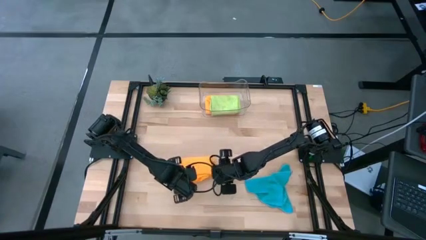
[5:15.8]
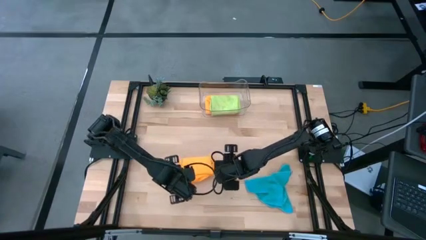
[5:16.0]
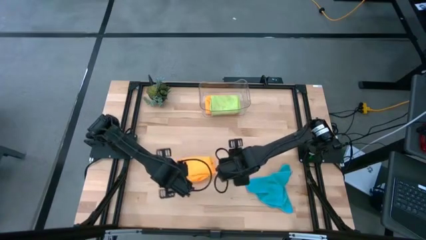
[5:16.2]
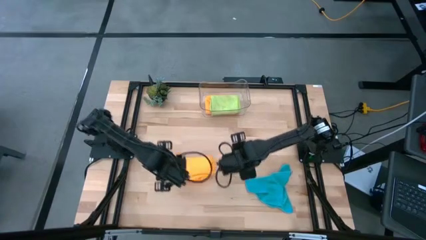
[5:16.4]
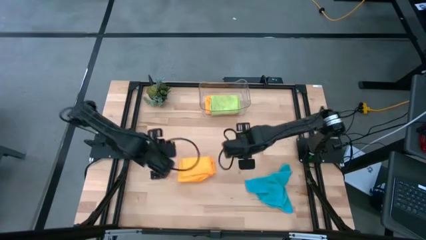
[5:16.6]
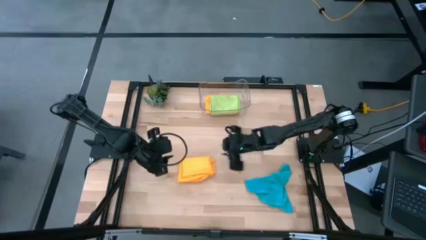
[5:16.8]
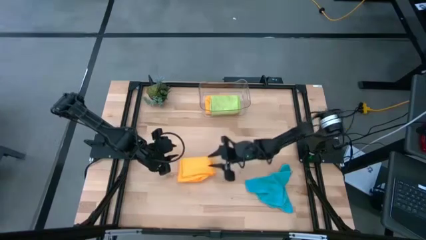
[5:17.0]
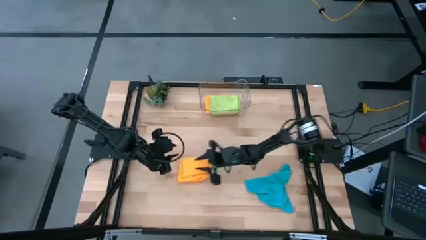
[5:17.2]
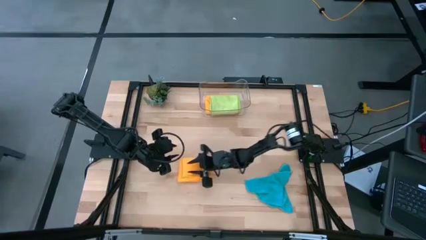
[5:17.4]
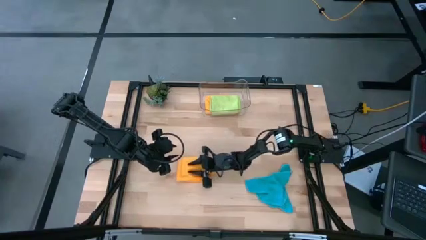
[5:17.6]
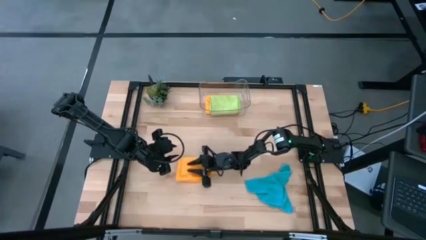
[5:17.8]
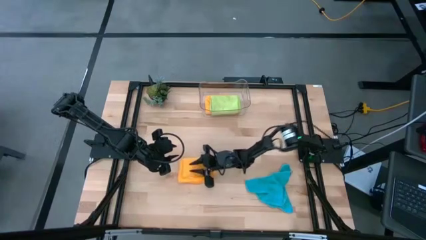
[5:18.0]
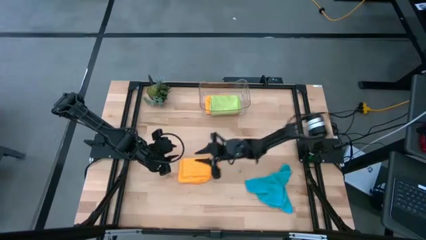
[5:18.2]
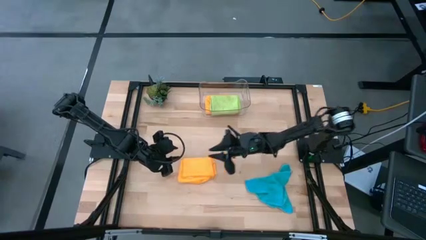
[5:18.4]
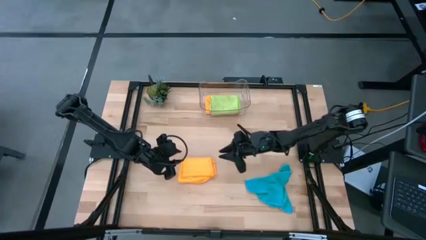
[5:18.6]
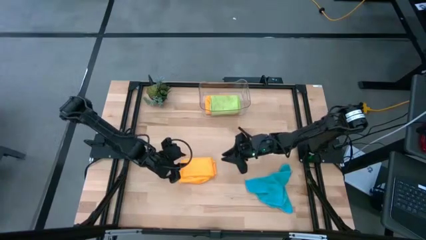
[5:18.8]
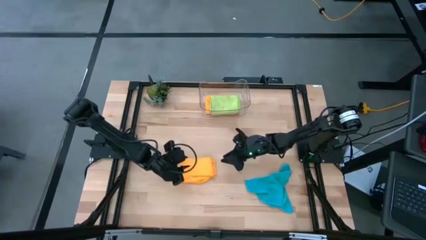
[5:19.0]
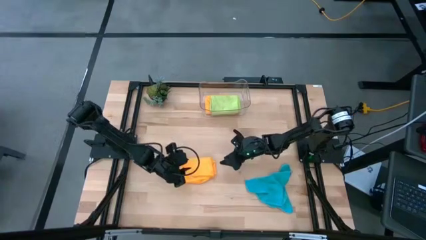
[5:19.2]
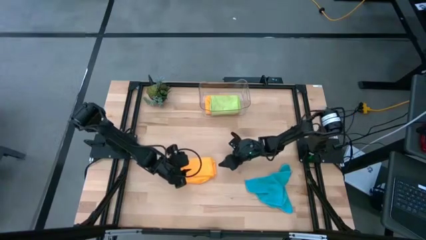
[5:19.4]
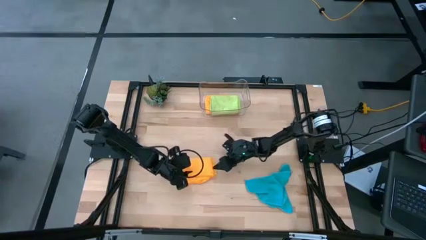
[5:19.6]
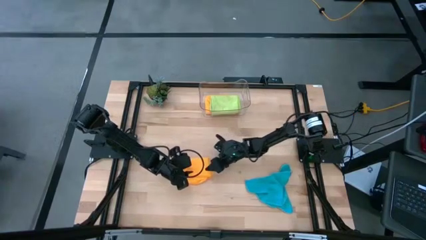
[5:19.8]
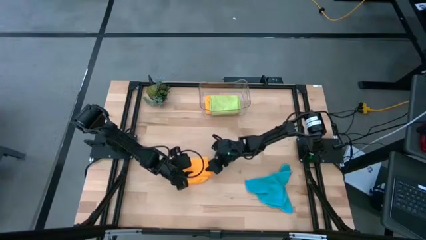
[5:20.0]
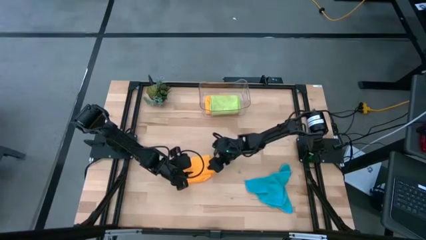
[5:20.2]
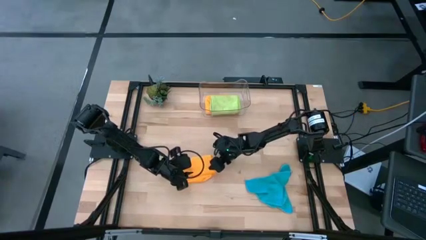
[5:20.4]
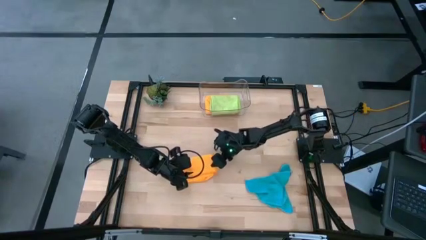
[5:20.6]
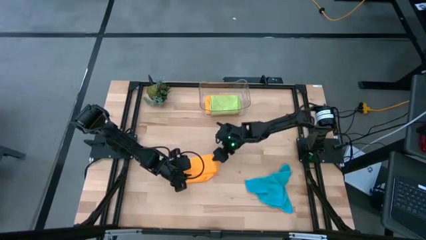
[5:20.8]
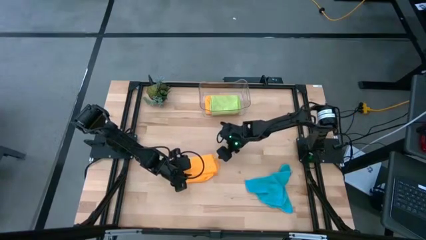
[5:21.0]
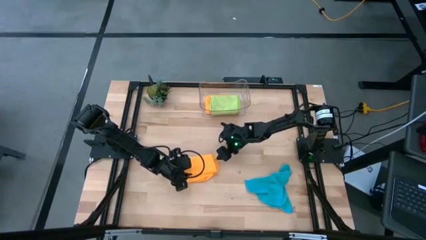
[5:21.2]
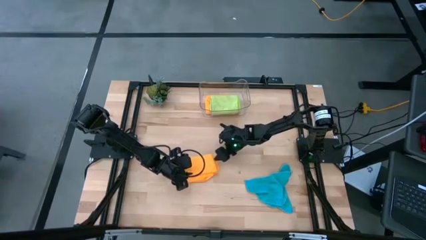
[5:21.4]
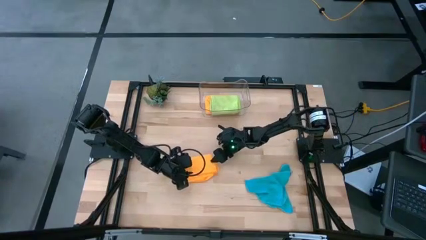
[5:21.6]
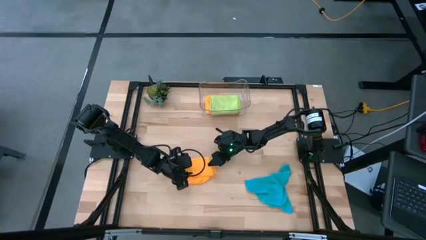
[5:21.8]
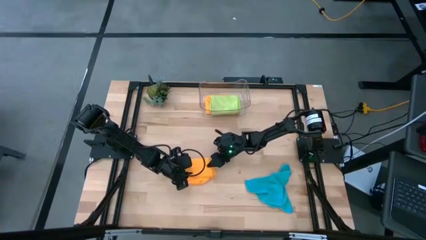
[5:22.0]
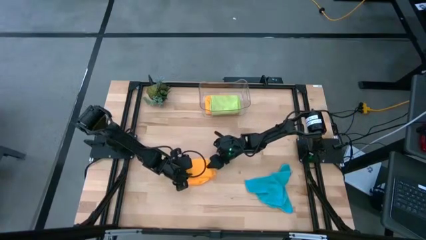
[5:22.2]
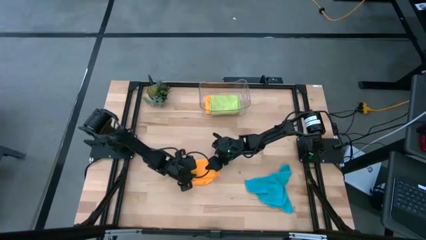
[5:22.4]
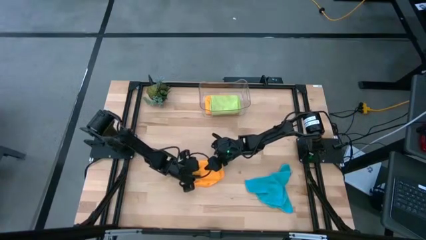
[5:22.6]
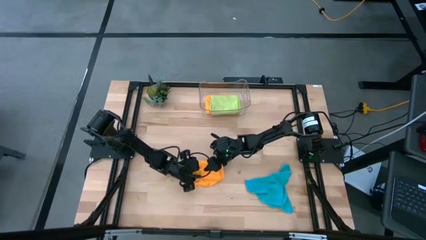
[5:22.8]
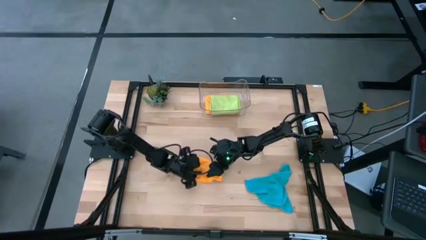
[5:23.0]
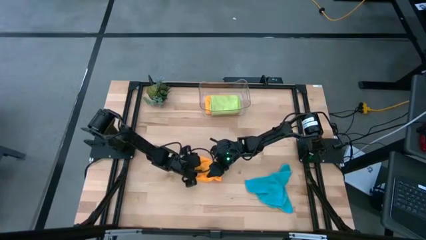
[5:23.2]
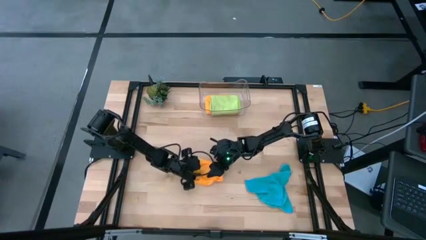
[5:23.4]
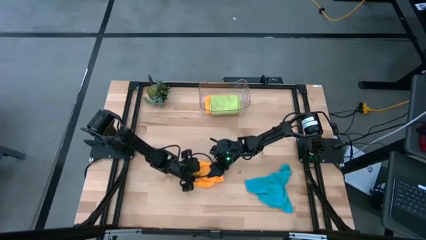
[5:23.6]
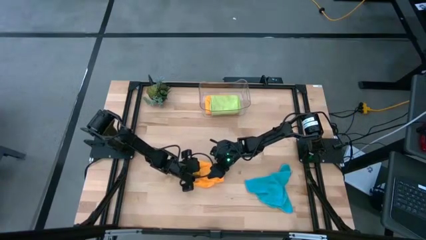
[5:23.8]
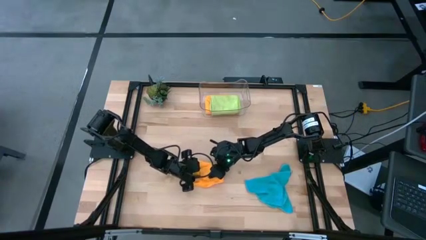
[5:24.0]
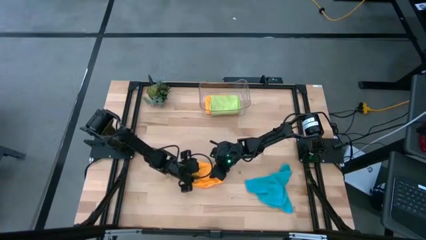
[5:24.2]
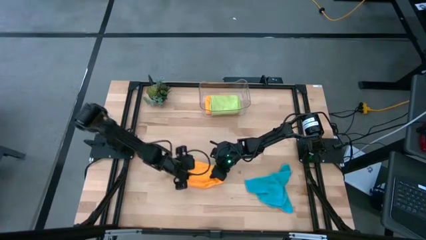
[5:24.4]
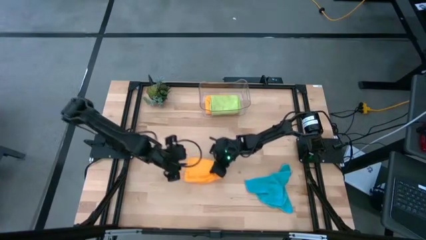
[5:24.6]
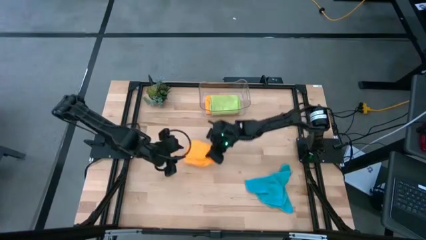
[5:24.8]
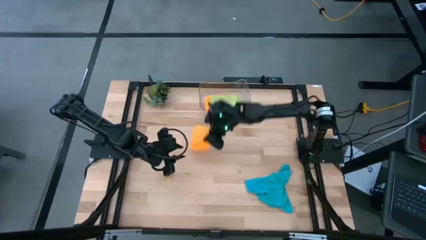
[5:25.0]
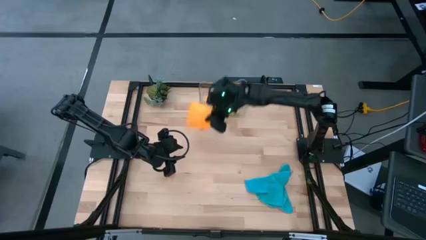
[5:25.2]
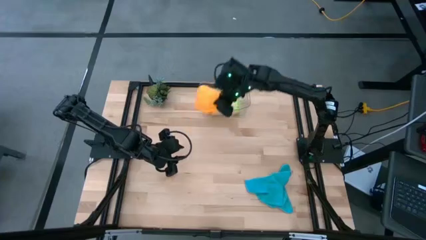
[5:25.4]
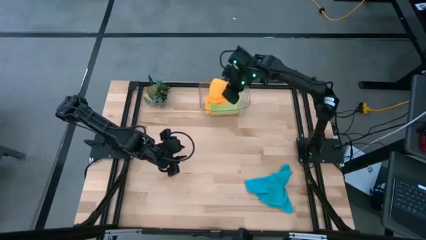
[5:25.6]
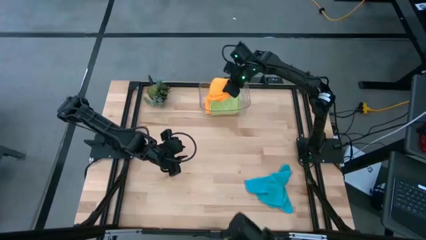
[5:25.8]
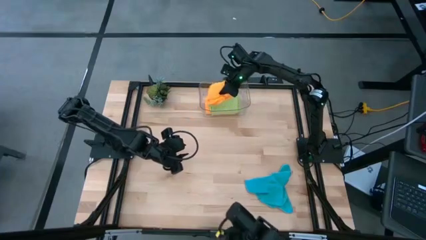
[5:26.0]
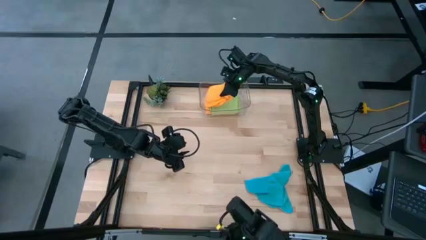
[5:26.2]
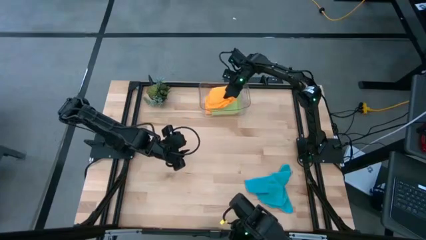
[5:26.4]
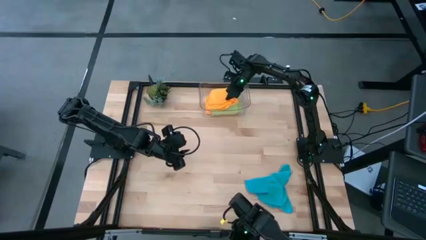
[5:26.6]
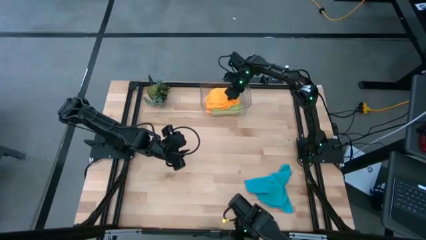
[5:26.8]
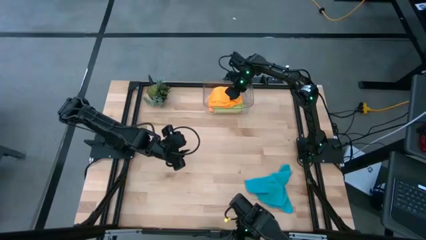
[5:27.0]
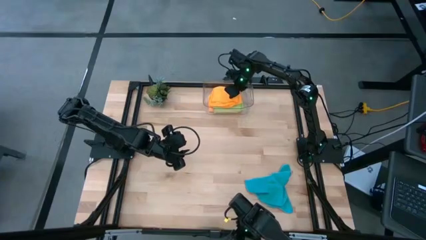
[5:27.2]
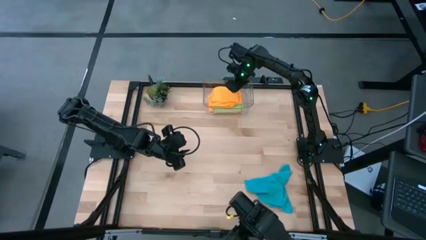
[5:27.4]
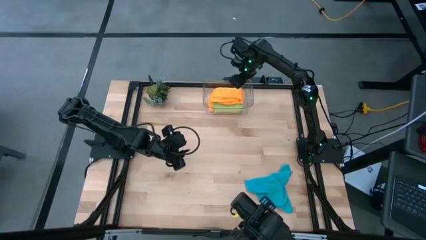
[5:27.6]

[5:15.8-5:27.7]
Task: Fold microfiber towels
Put the orange microfiber cloth into the transparent bin

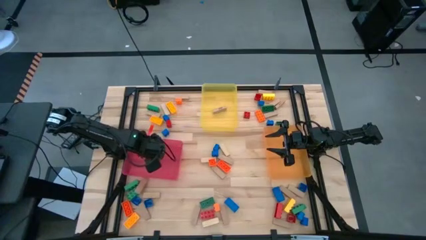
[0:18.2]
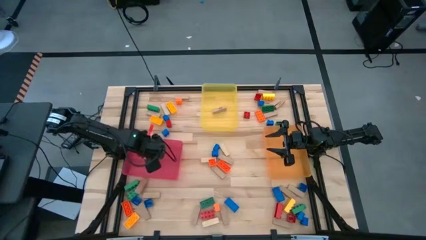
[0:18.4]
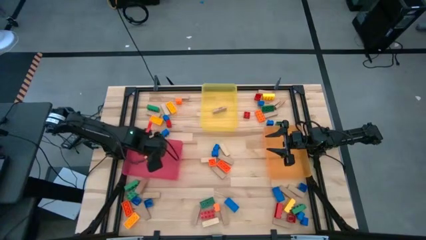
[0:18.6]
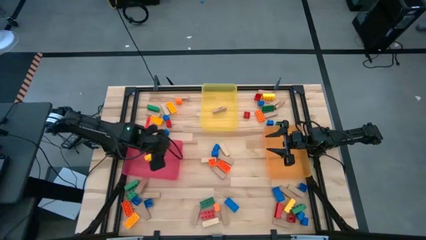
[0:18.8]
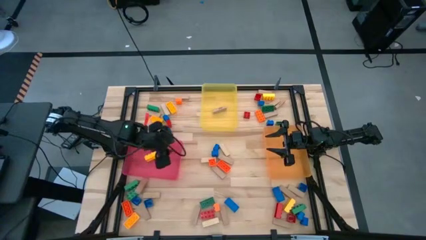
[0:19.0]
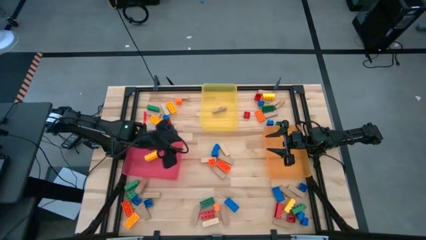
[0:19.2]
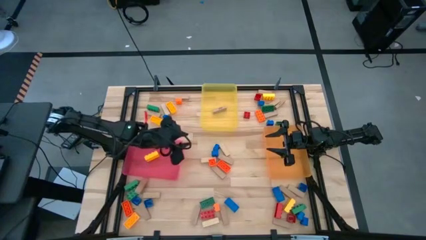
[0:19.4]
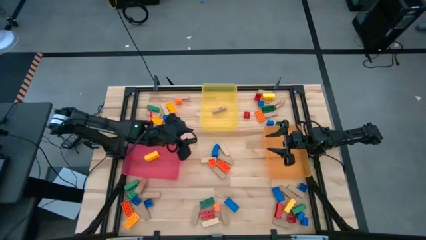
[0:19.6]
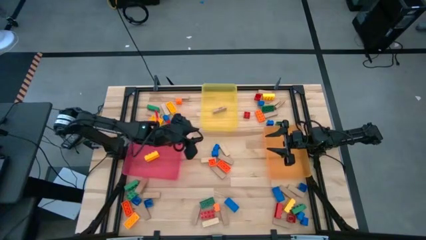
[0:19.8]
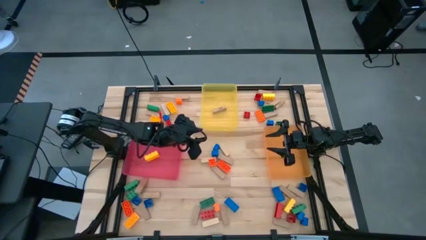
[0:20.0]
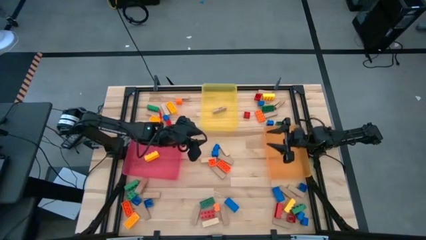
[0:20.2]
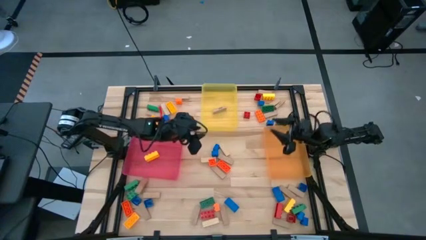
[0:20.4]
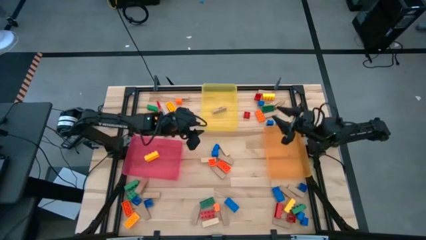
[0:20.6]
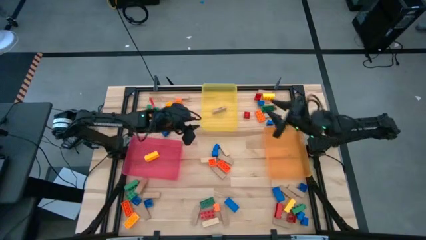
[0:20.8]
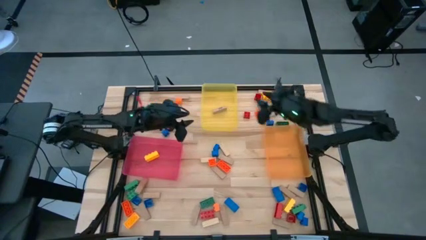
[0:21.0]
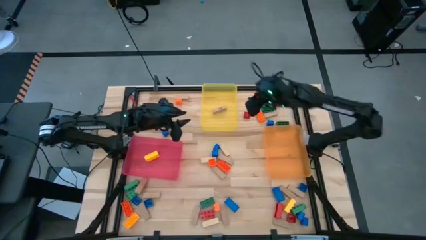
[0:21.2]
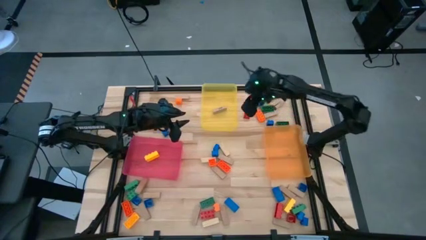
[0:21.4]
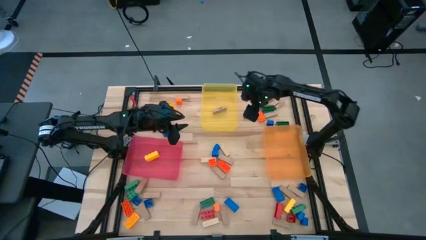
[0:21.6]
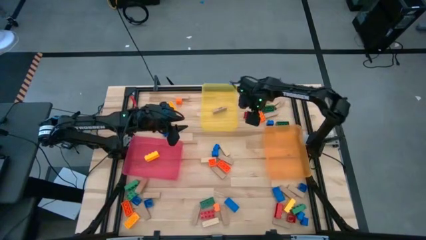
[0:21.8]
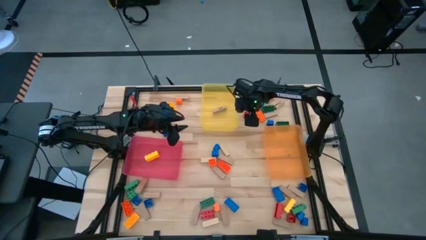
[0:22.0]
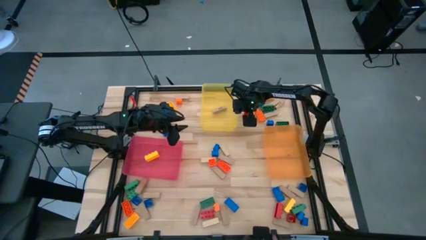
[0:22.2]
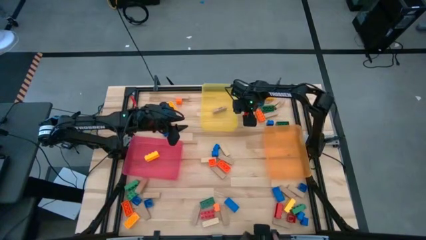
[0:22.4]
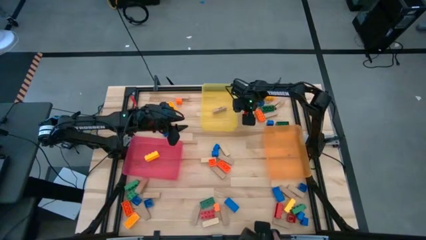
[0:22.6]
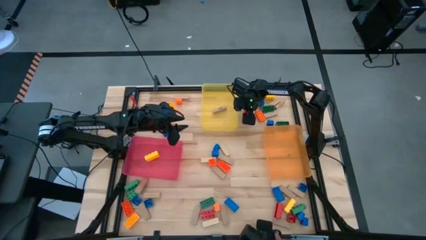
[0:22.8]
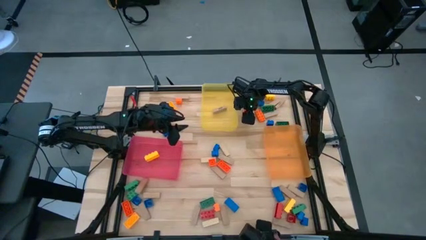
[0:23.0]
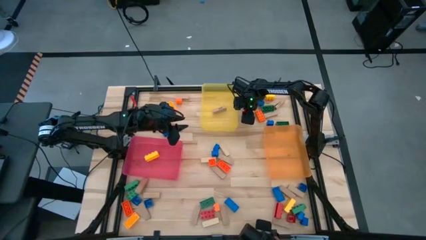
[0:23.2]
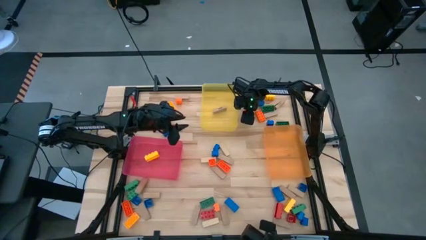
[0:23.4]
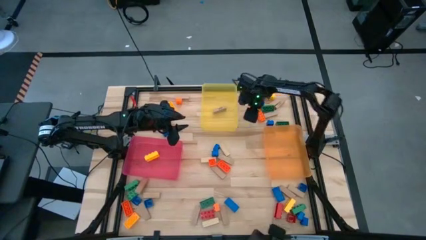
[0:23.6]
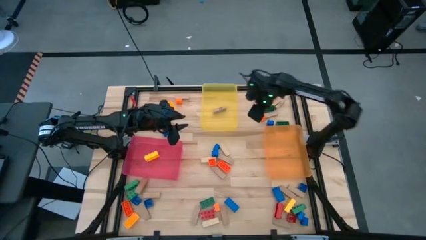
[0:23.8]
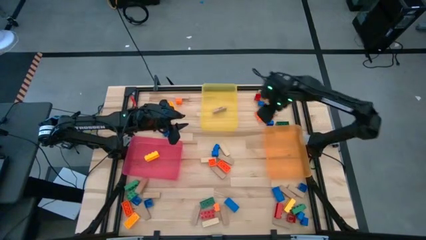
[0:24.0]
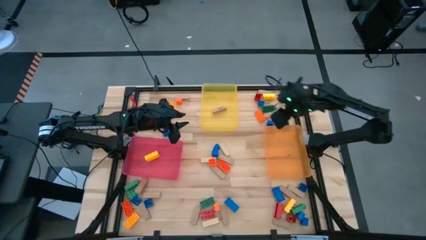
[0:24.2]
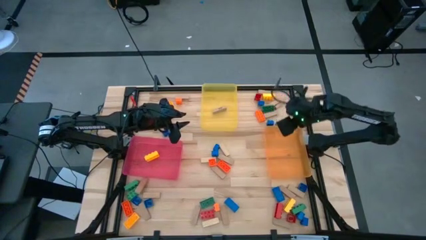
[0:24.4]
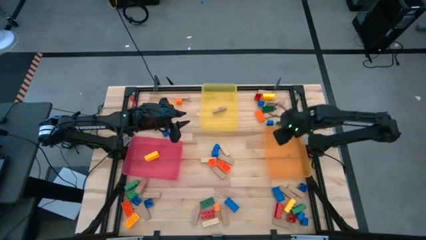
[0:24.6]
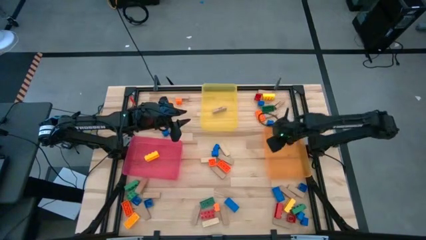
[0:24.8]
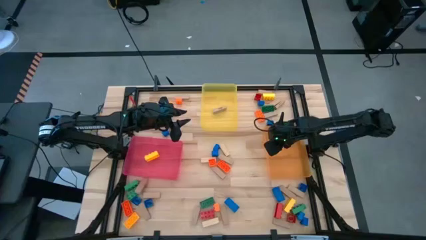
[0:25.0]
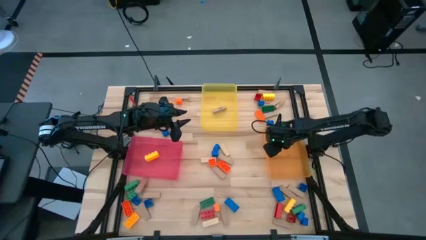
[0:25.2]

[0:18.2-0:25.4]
Task: Sort blocks by size
Put the 1 stud red game piece into the orange bin
